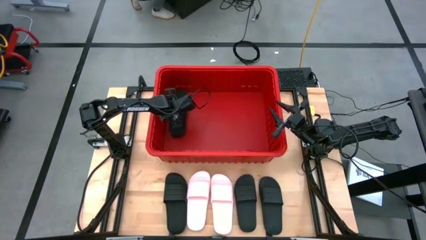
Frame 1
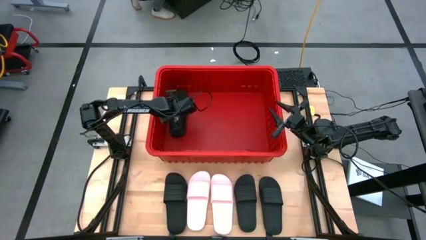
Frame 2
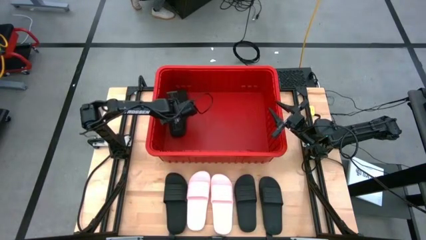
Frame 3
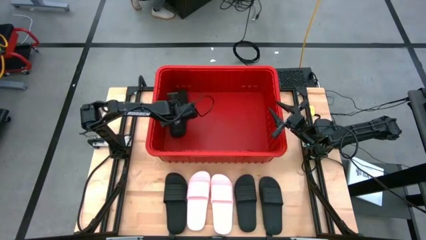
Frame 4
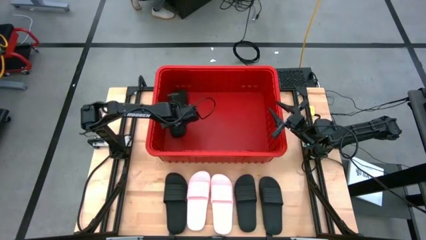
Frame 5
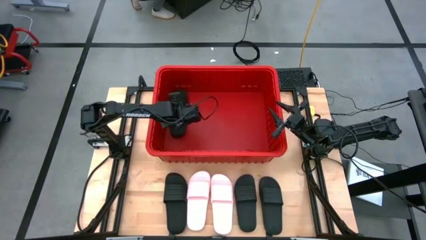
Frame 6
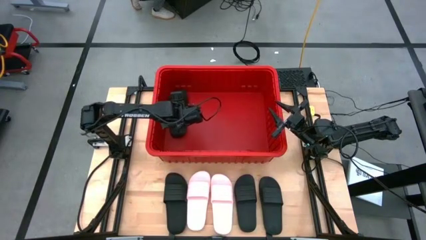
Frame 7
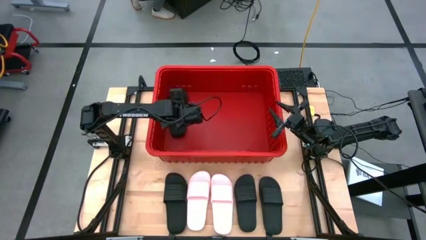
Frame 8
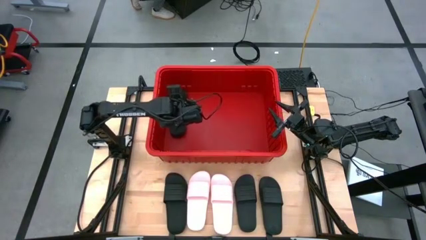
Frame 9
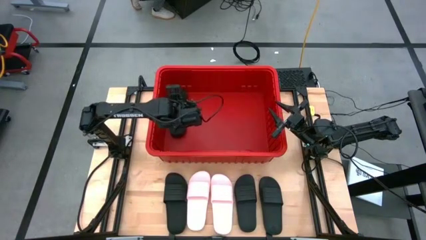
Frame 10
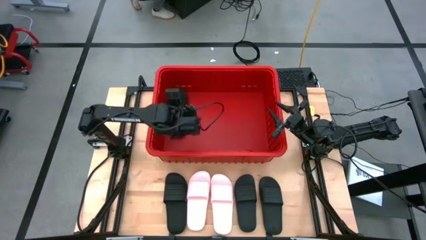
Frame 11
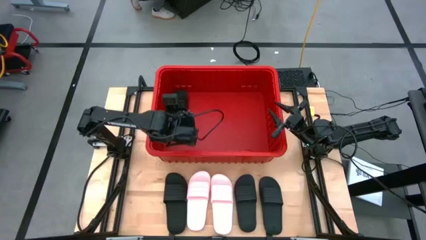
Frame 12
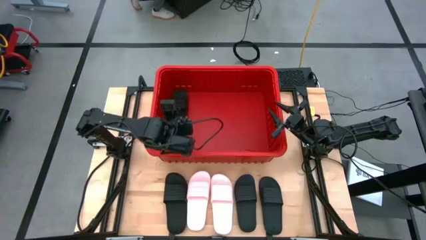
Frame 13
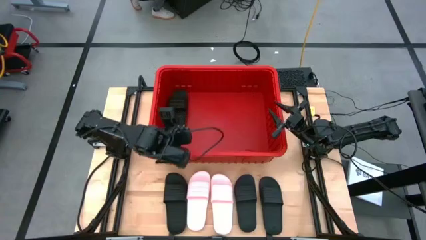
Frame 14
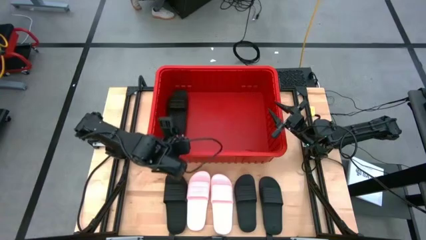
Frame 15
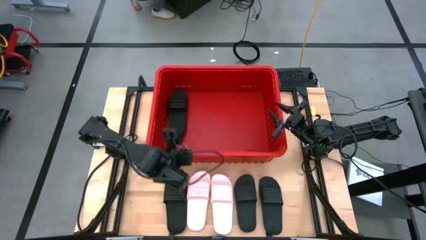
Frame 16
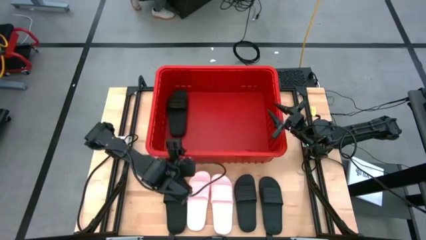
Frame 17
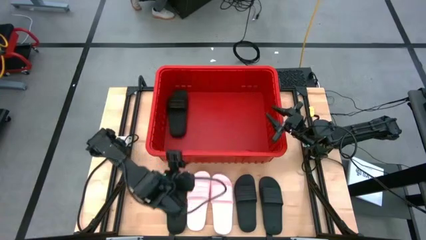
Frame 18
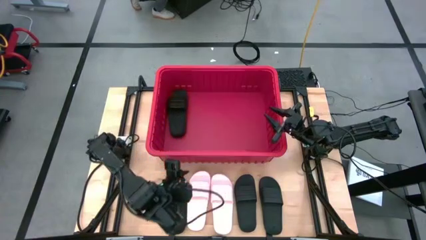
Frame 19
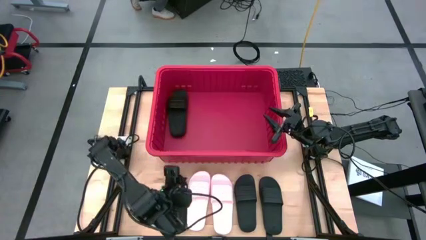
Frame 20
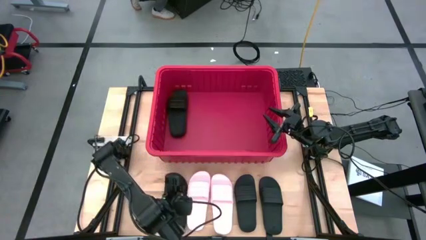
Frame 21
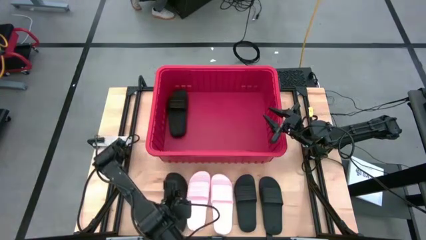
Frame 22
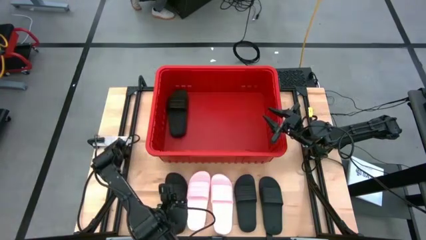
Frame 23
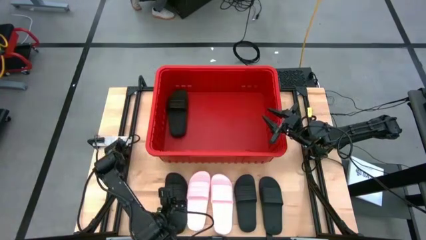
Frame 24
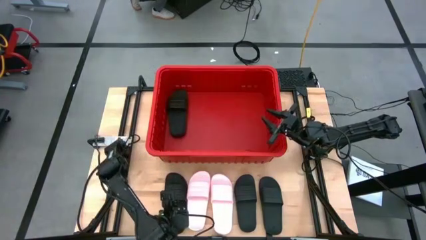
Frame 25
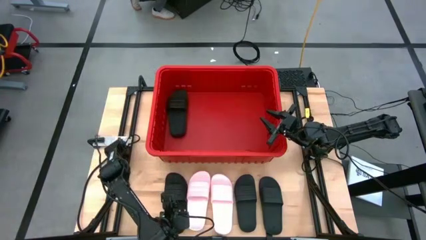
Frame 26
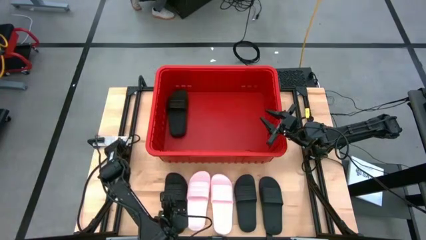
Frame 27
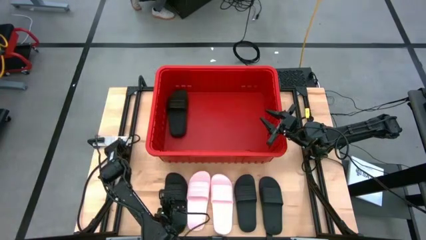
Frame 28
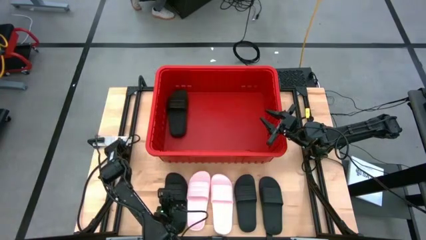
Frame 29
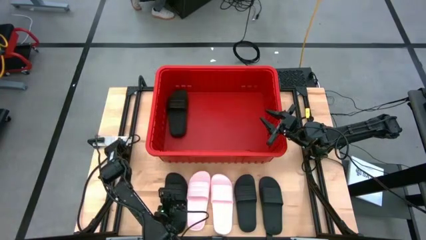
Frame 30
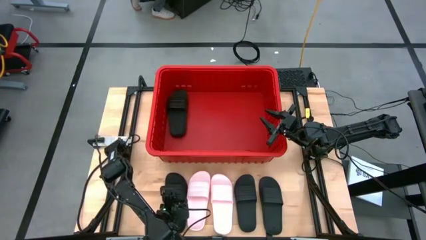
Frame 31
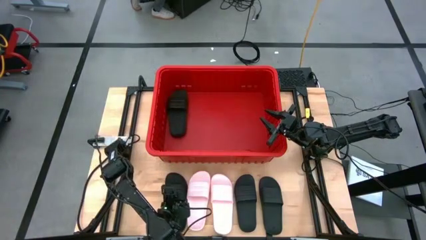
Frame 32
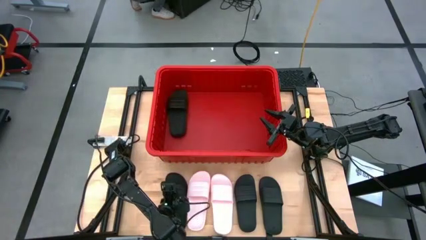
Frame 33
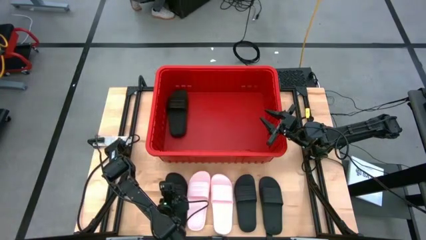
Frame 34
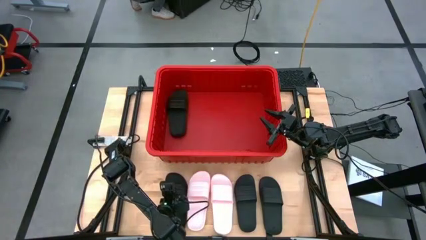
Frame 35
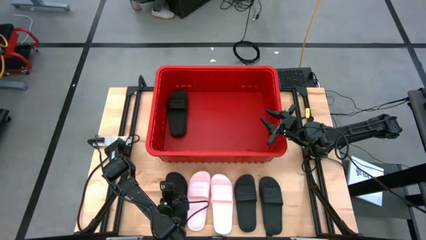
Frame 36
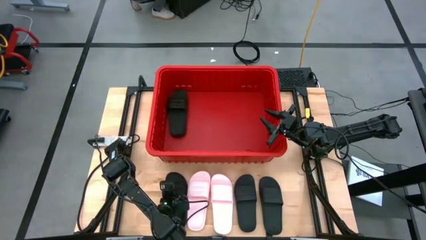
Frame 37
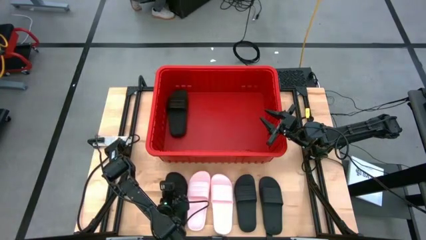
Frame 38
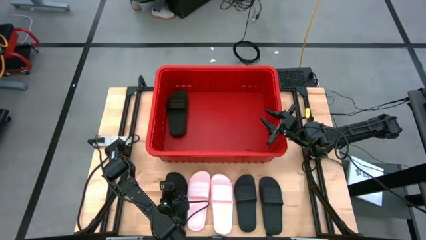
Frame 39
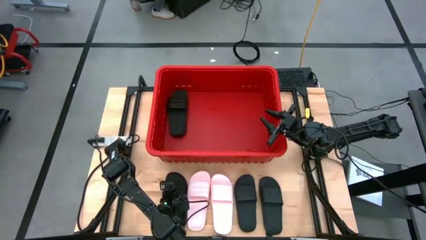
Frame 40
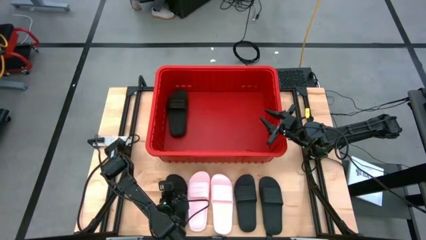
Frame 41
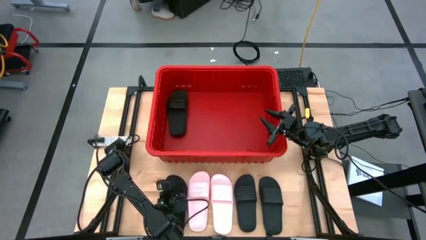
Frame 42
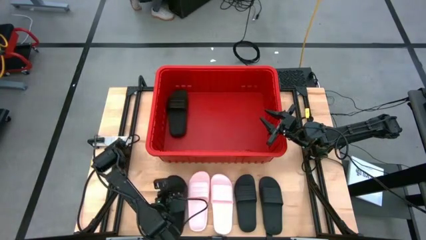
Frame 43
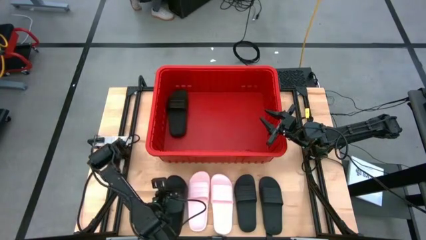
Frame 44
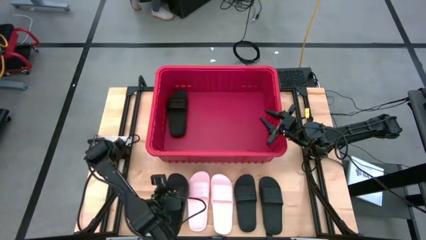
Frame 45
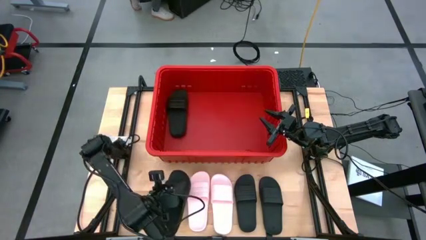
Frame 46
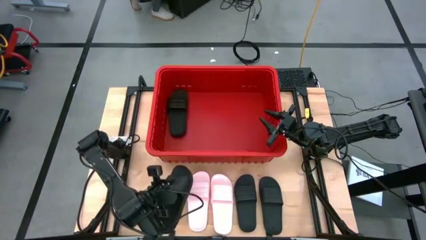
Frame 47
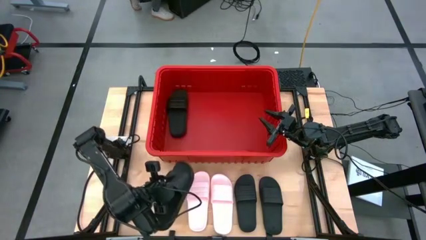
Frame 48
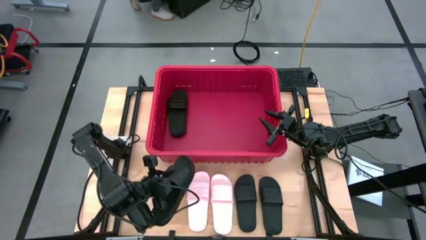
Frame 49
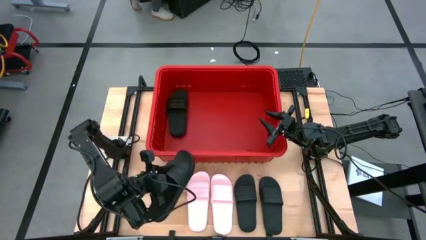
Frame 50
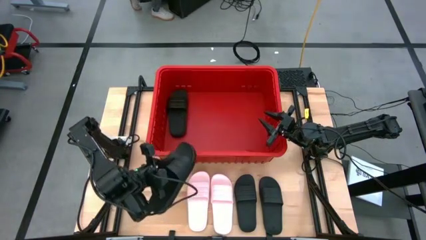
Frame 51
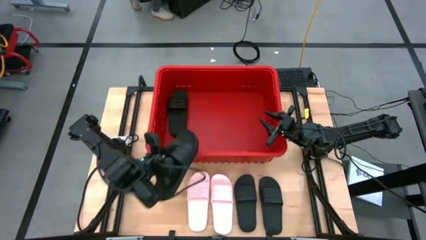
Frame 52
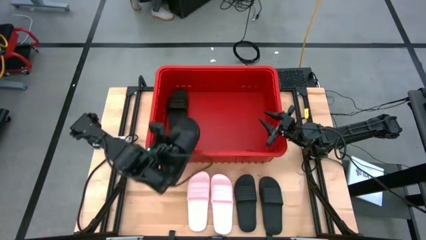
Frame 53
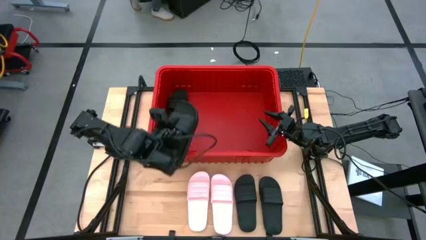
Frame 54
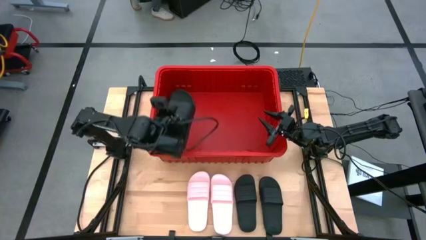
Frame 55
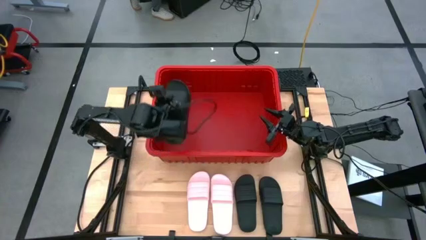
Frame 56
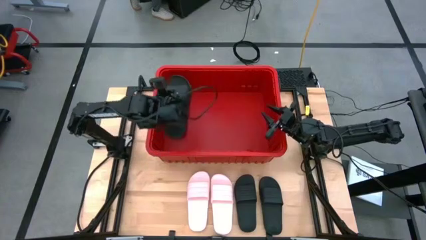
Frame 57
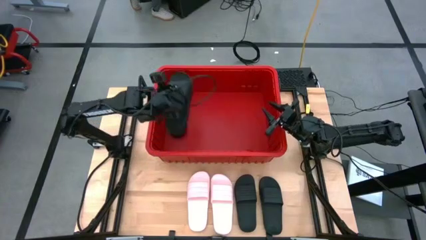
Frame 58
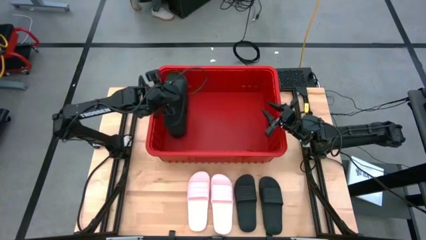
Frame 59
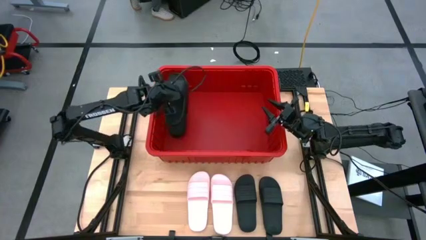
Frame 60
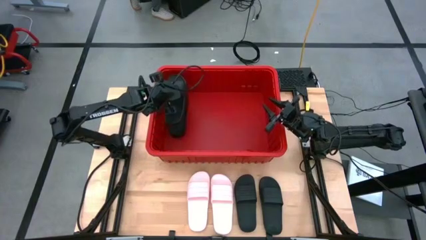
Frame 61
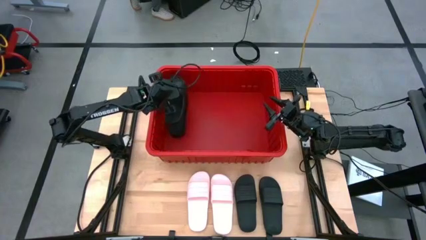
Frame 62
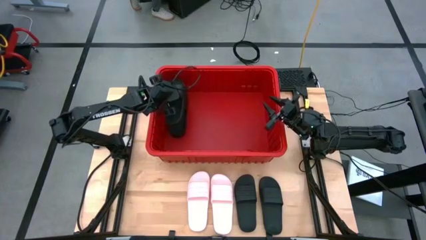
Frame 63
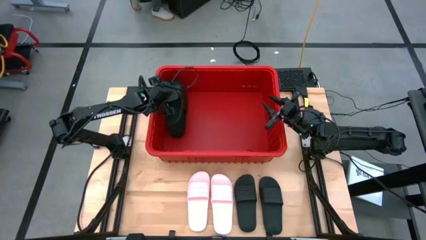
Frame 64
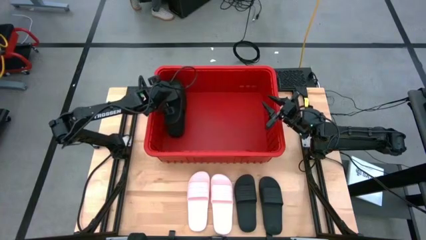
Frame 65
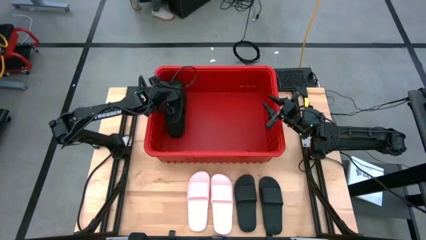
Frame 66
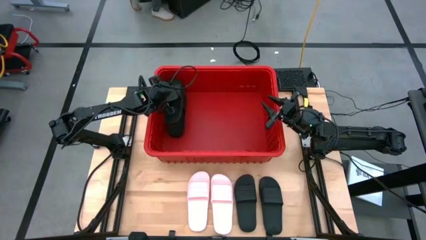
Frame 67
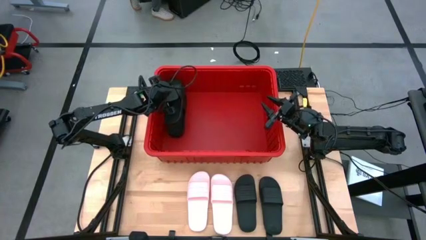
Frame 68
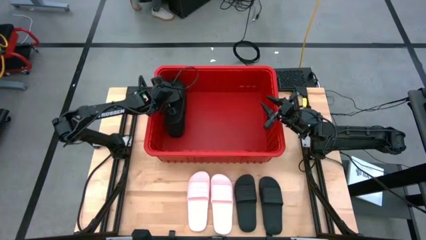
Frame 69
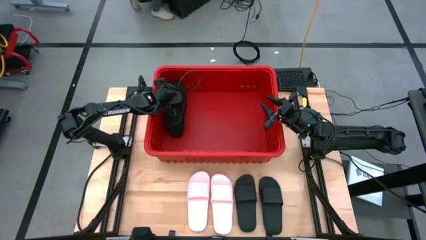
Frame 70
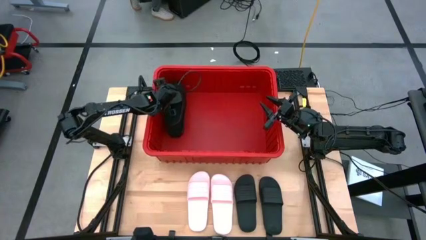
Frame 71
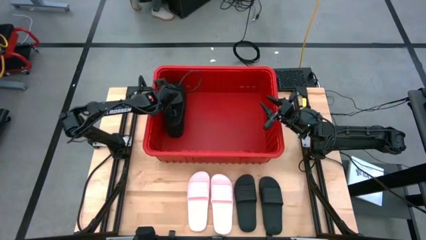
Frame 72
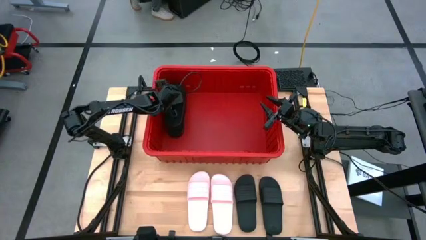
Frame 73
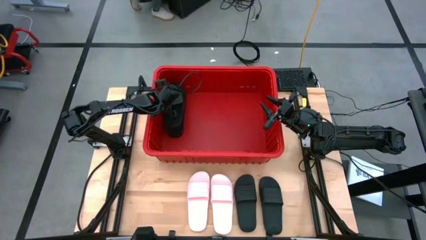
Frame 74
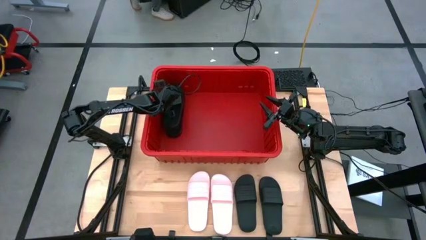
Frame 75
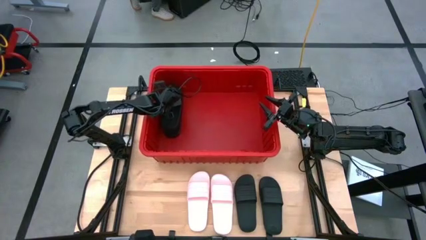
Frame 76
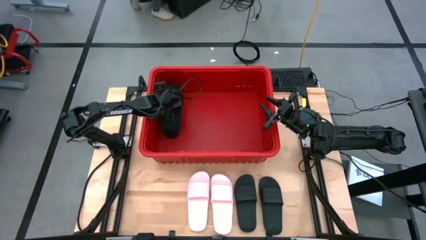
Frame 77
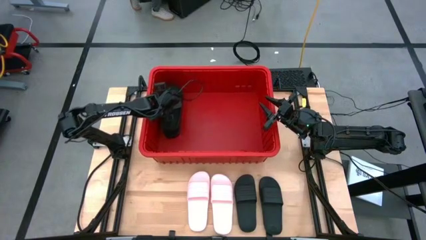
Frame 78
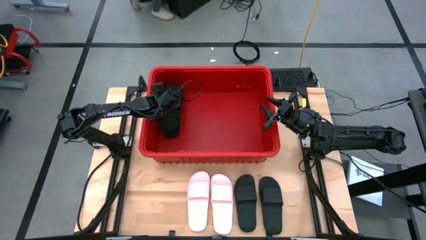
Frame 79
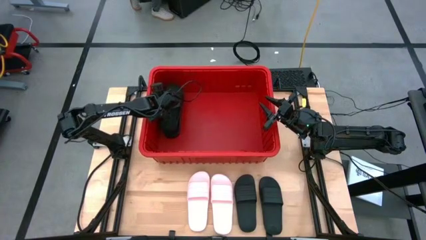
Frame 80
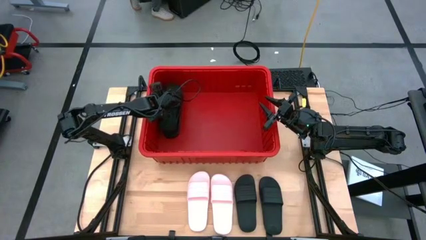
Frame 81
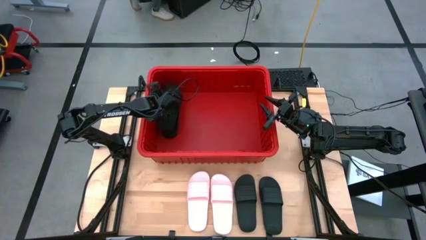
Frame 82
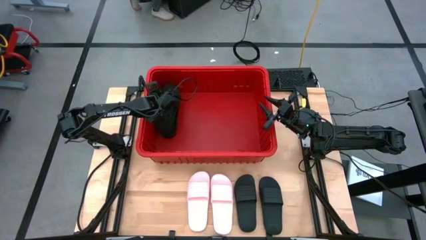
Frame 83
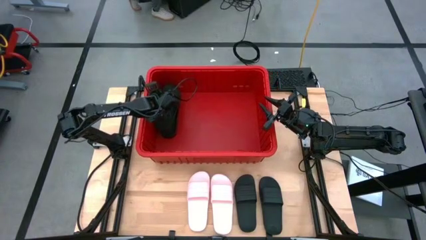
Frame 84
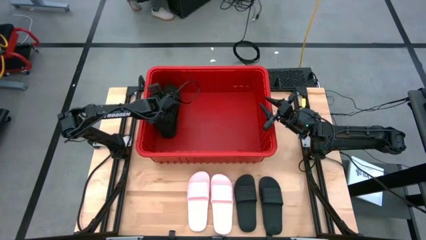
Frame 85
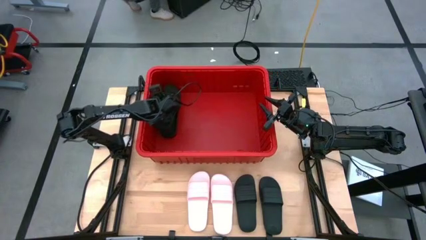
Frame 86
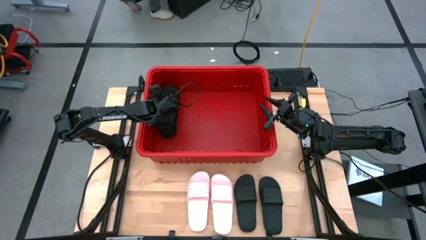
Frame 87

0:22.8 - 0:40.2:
Task: Pick and place slides into bin
Put the black slipper into the black slipper
